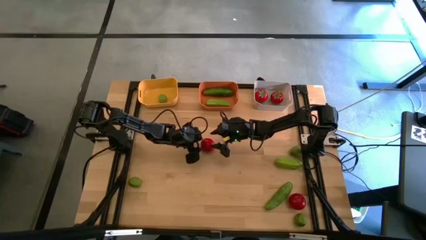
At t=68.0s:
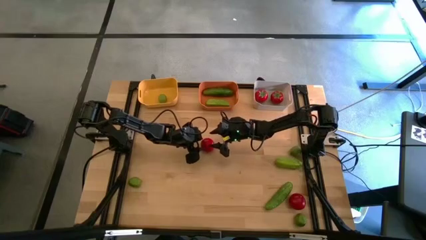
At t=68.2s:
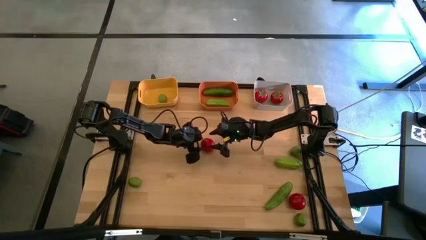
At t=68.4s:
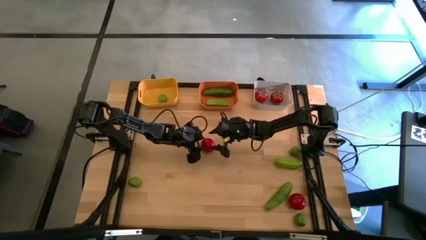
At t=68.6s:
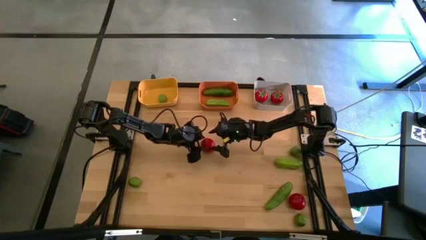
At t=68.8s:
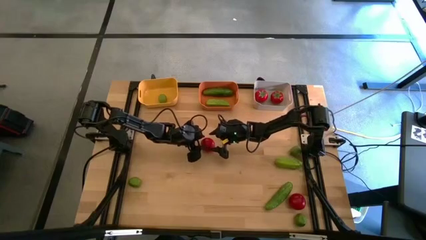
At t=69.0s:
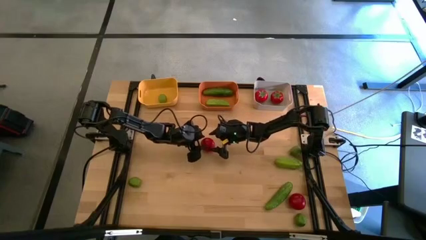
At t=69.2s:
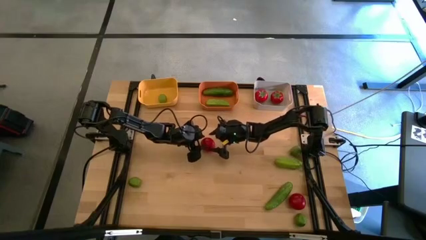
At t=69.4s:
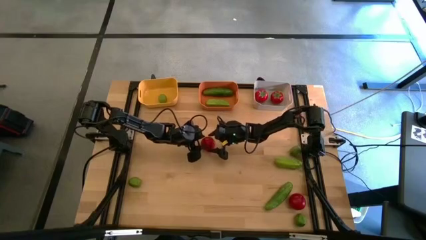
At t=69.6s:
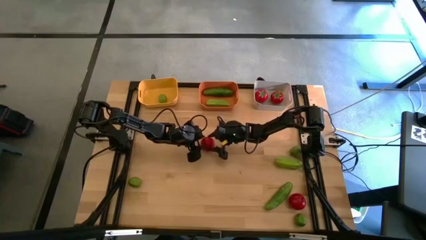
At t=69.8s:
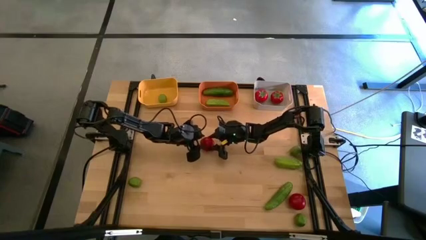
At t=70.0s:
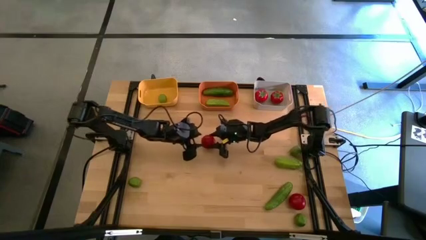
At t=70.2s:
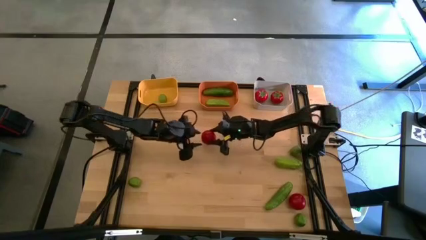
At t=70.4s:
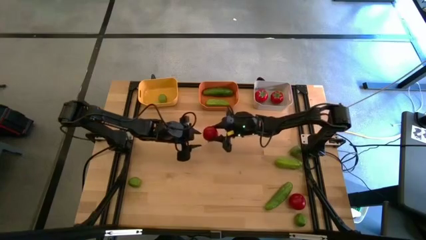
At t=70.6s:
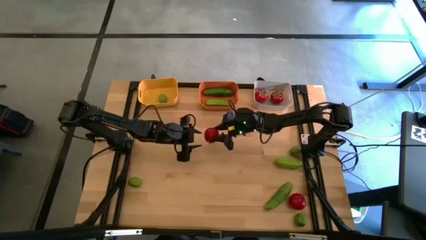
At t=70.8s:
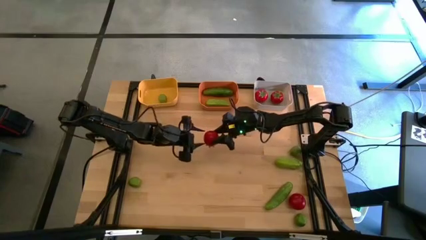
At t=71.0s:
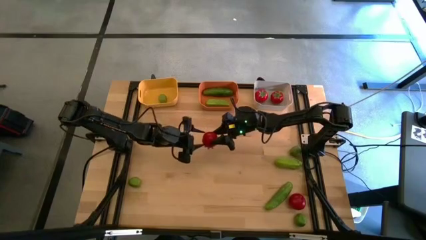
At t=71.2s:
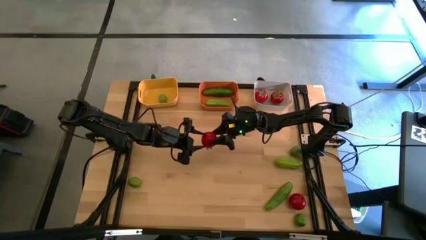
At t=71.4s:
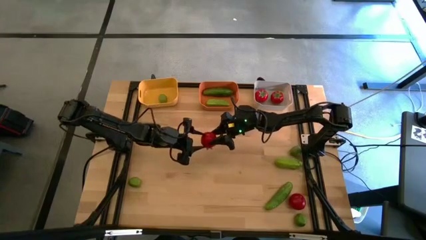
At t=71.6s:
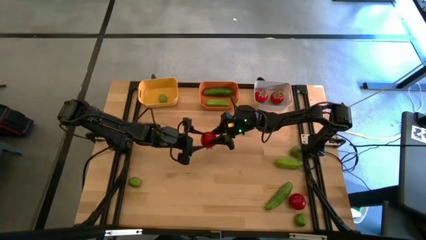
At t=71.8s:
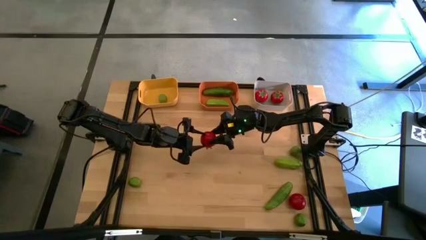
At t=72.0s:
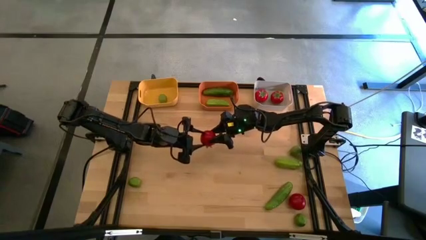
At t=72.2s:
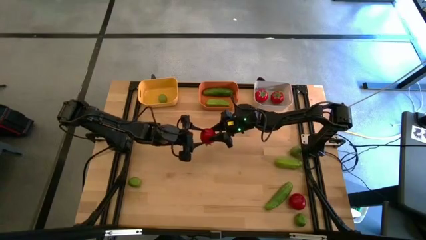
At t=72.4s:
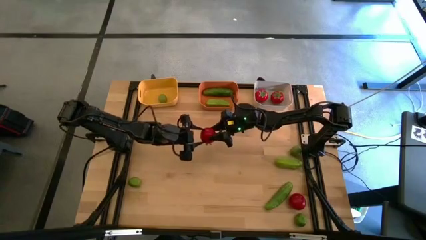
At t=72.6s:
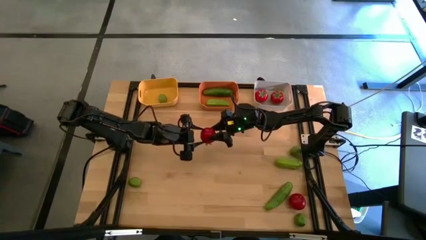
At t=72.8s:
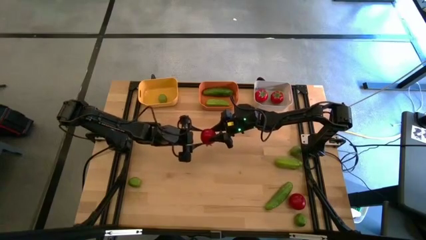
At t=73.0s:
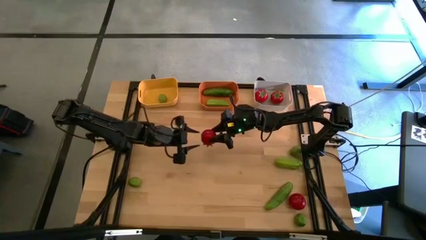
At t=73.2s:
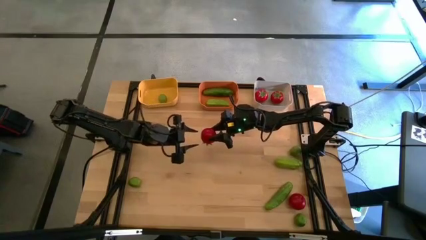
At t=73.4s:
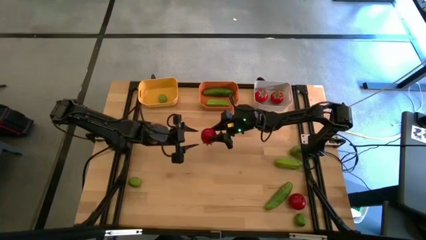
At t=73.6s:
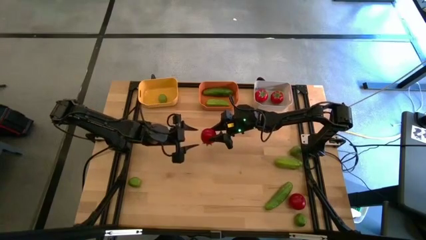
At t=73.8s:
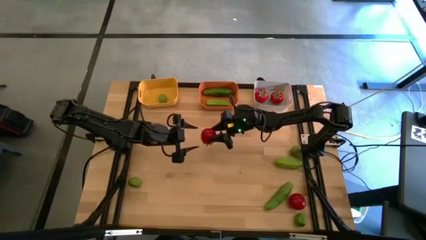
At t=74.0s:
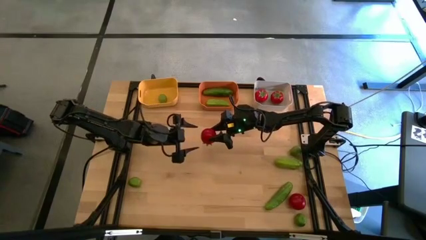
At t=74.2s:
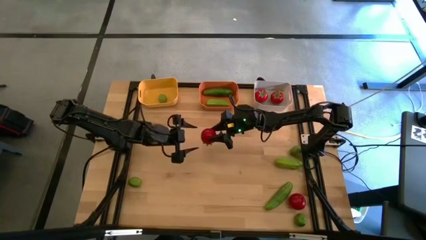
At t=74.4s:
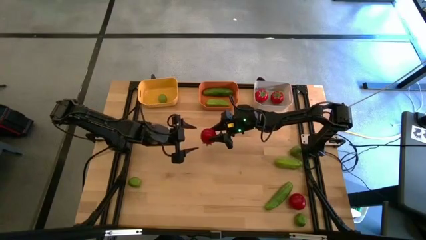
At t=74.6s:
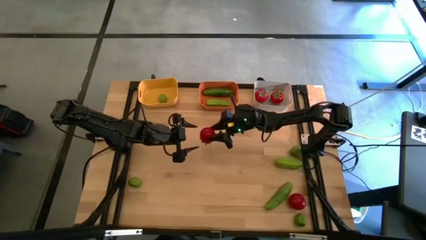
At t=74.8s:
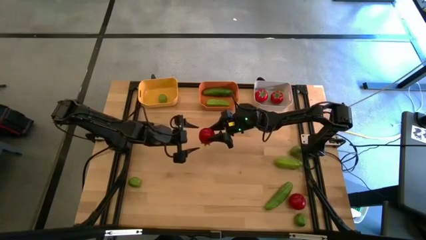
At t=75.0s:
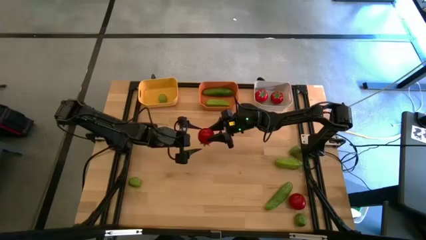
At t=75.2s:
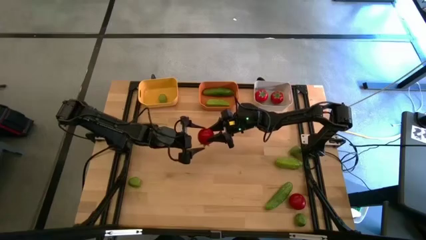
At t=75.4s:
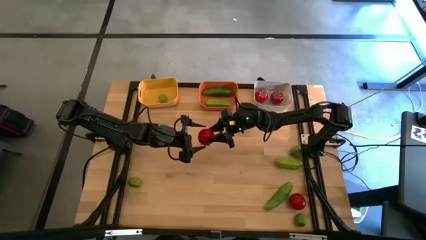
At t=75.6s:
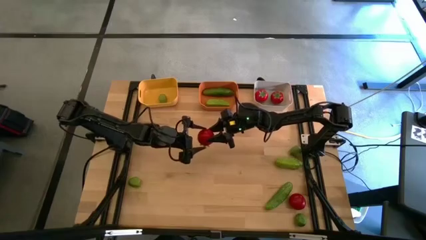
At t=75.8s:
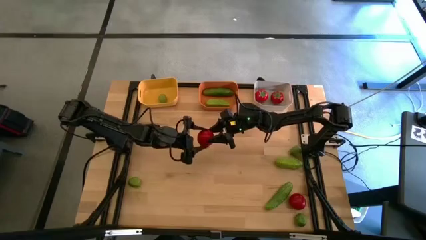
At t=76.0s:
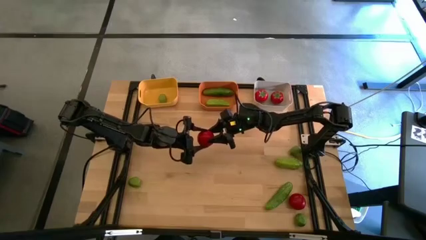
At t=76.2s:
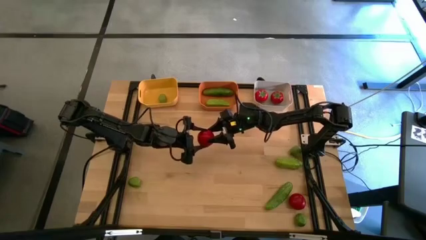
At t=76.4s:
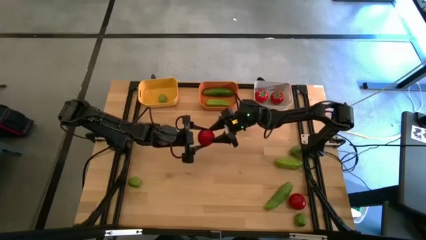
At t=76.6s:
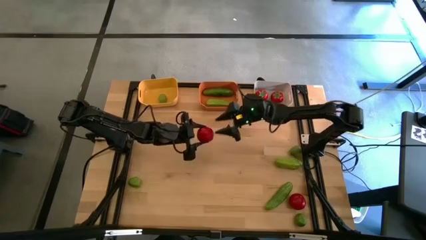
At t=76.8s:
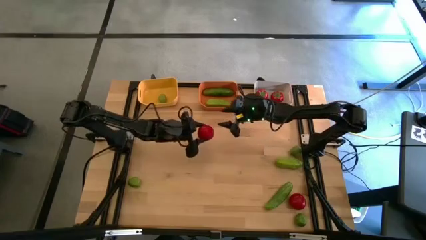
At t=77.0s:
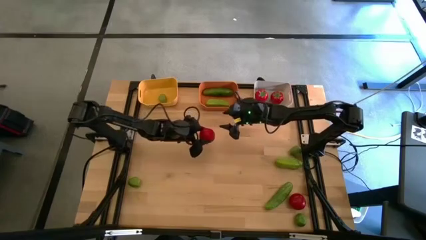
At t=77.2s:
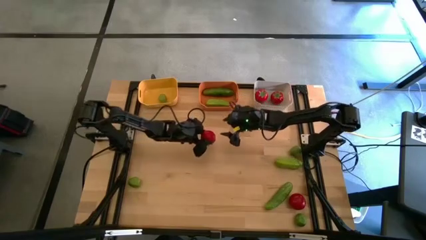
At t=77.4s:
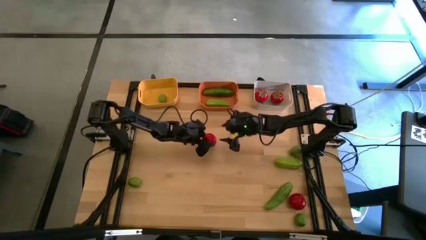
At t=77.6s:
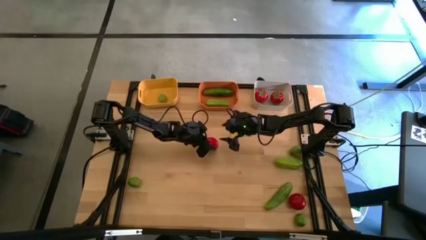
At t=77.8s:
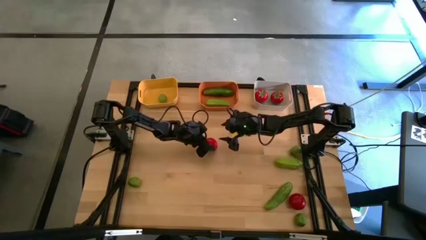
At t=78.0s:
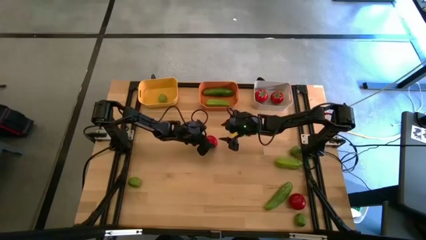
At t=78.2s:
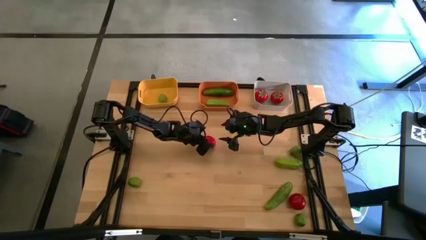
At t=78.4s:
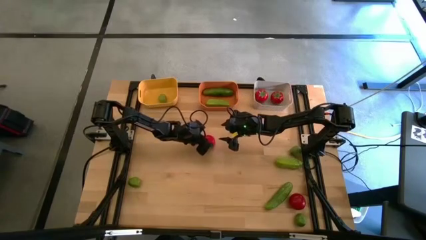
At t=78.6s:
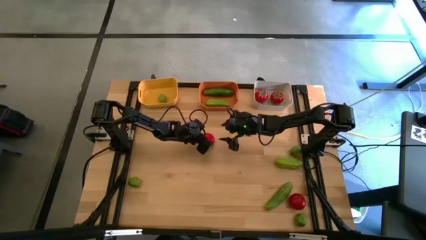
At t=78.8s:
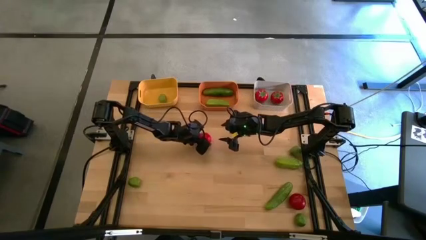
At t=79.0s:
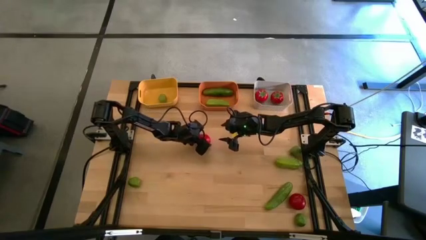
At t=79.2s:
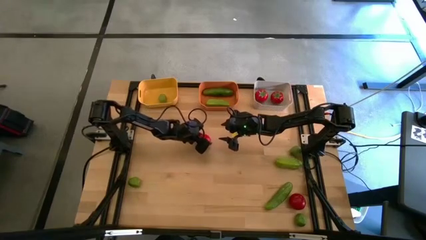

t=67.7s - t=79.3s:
Task: Sort produce into baskets
Put the tomato into the white bin
